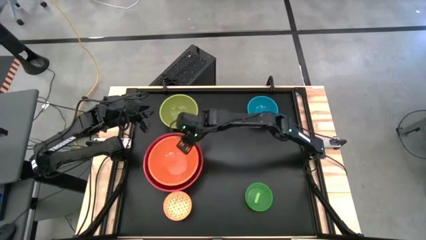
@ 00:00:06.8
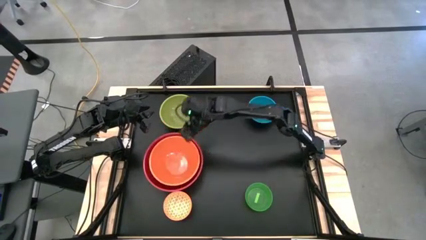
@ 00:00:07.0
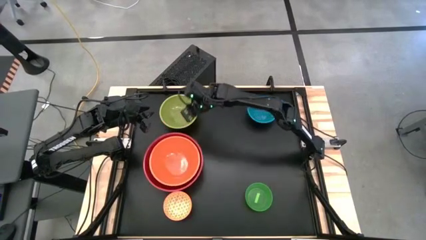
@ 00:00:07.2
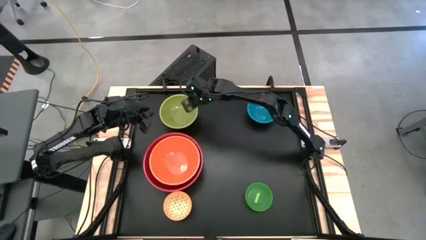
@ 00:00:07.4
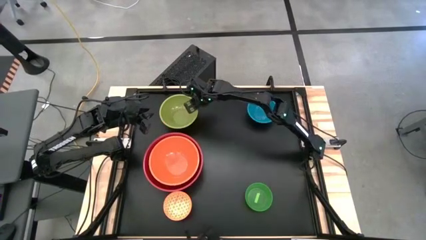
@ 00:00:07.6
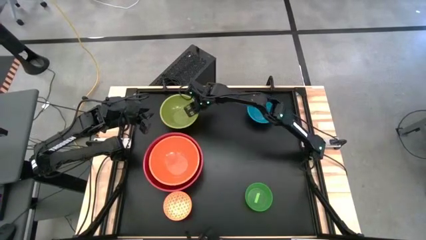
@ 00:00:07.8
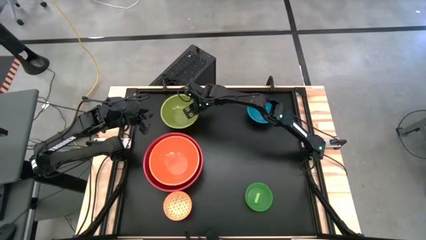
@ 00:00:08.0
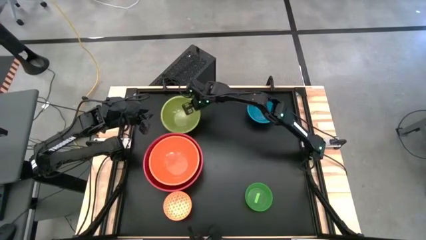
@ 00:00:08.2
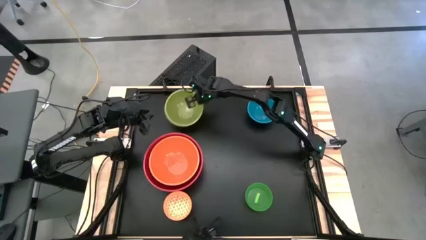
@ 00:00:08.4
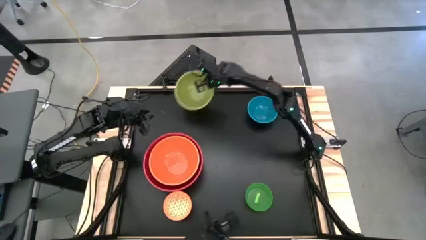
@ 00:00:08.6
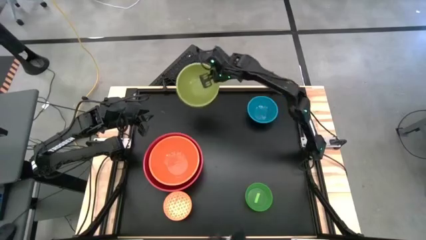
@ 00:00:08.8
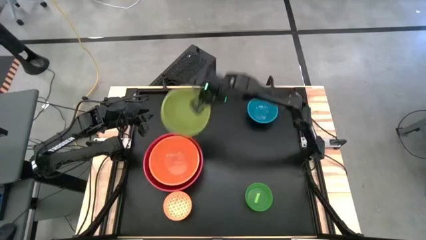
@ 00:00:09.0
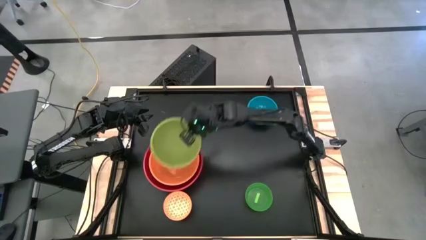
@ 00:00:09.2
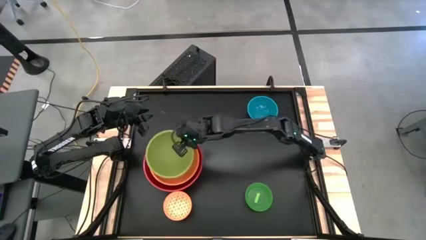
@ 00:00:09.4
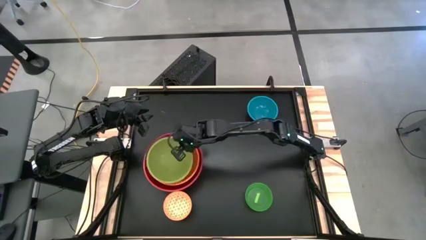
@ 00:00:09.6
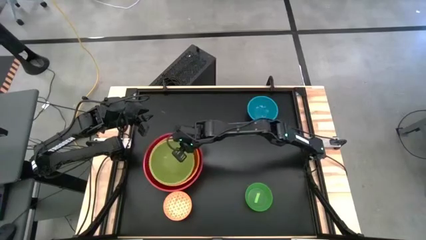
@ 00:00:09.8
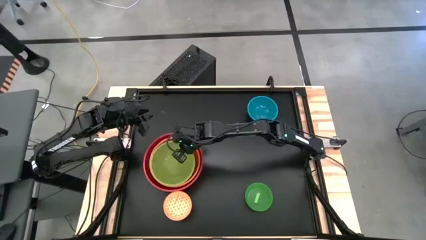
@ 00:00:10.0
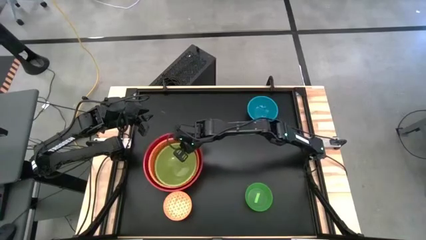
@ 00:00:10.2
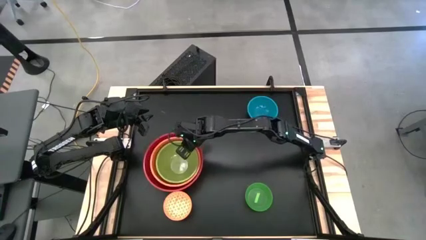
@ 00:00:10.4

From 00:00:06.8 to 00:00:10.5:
Stack the light green bowl on top of the orange bowl

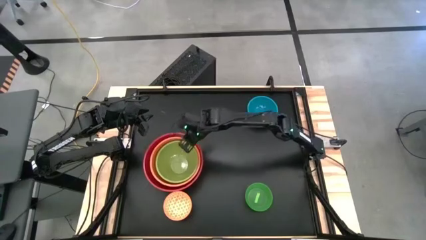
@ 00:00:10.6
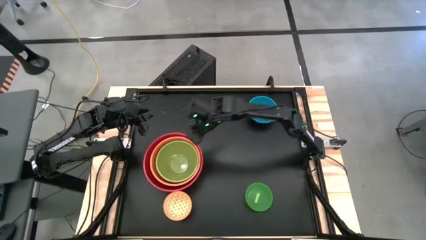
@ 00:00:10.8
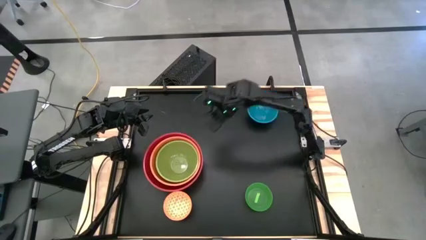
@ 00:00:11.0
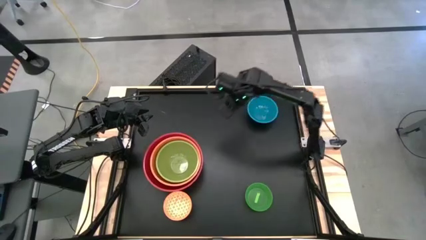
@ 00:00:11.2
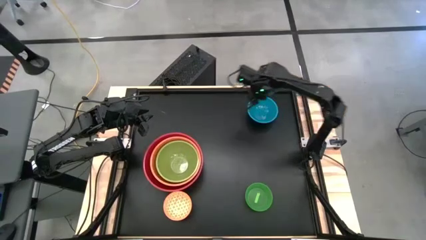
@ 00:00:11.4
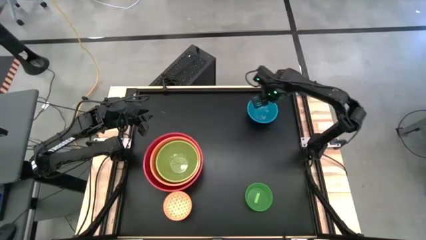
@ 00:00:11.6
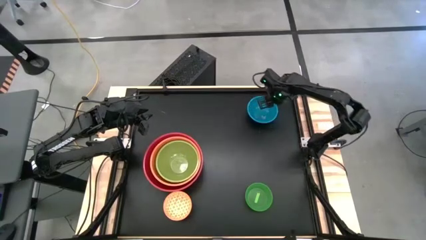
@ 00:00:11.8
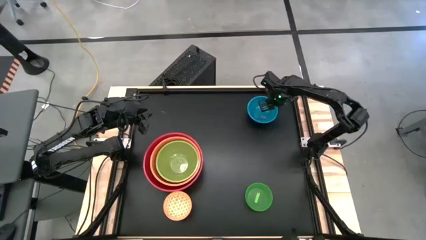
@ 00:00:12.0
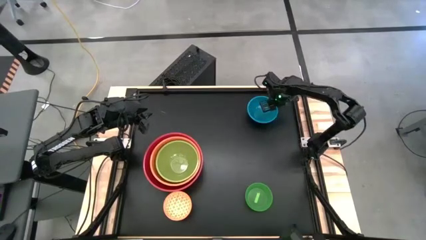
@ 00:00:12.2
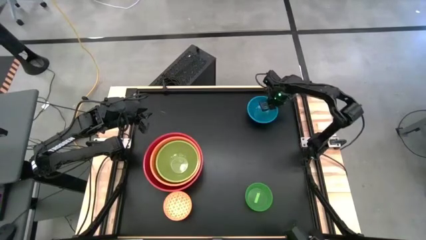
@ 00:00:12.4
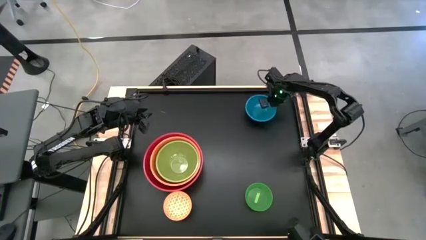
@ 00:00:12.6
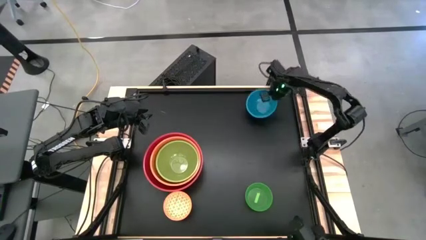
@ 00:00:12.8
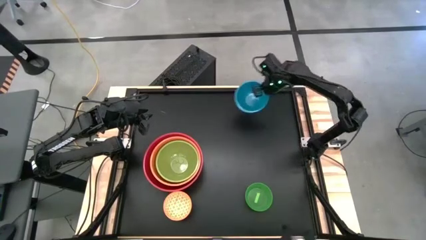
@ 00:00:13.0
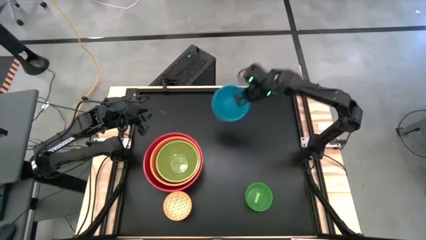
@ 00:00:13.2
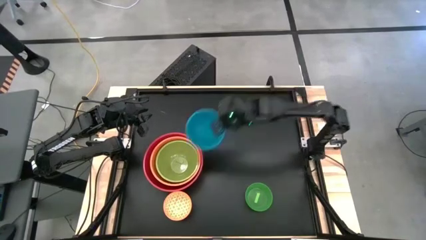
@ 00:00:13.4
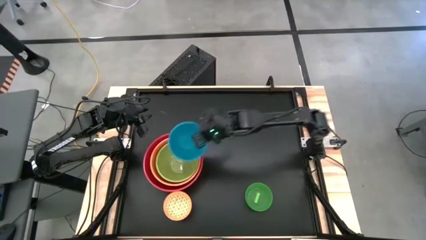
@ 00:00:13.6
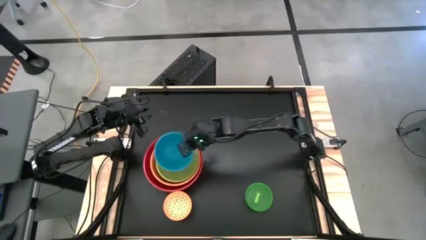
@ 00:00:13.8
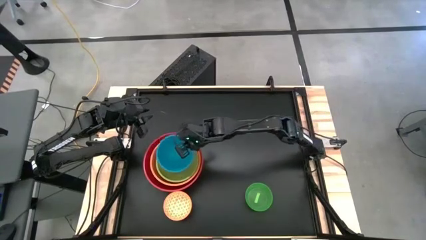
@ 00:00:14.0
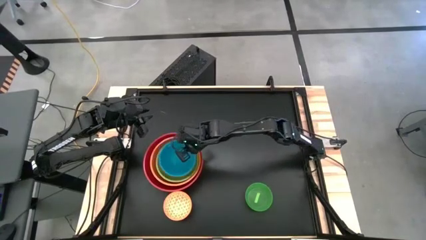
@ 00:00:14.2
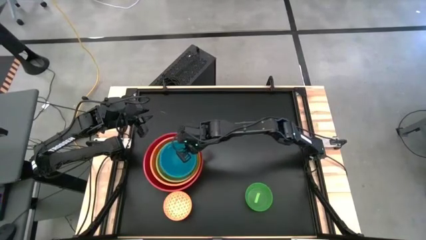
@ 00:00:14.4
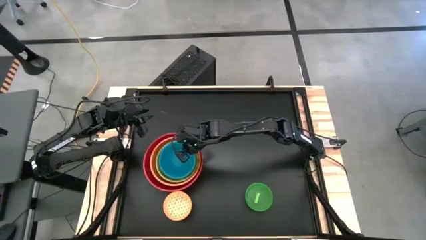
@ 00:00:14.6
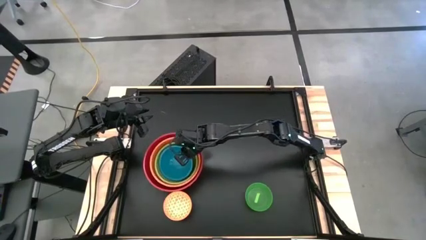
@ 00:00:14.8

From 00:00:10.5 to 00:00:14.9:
Stack the blue bowl on top of the light green bowl

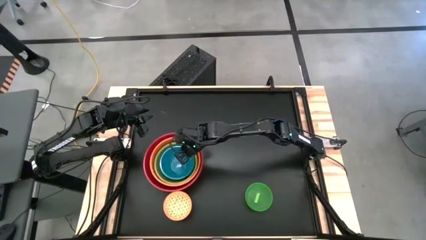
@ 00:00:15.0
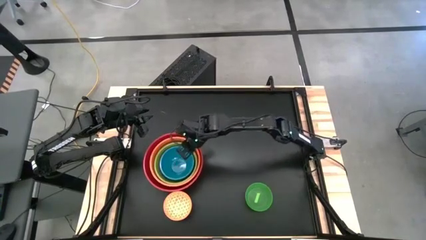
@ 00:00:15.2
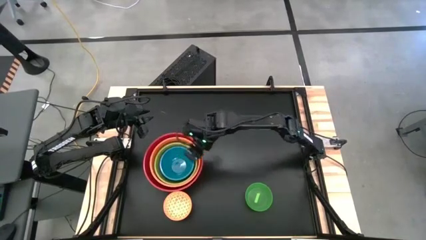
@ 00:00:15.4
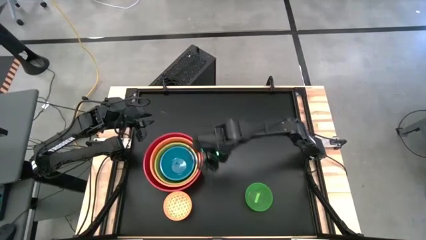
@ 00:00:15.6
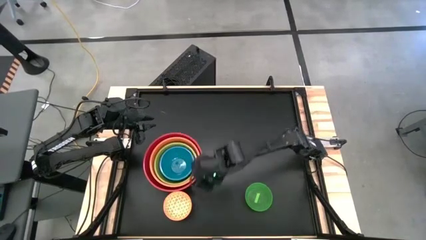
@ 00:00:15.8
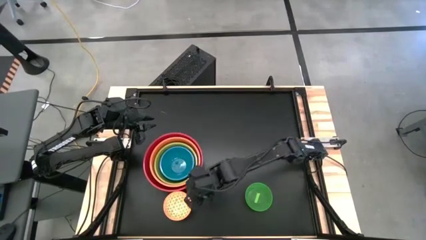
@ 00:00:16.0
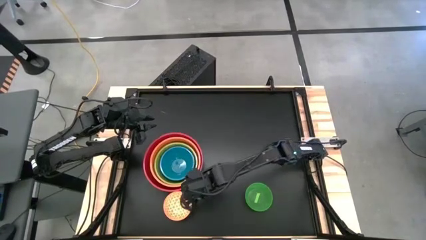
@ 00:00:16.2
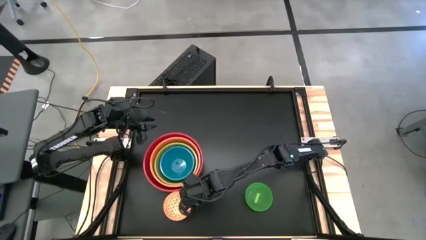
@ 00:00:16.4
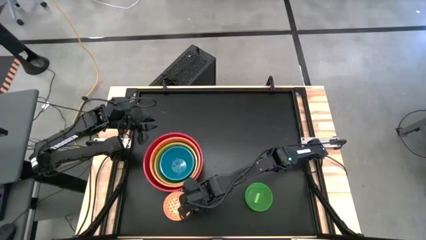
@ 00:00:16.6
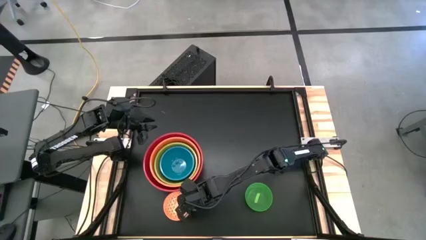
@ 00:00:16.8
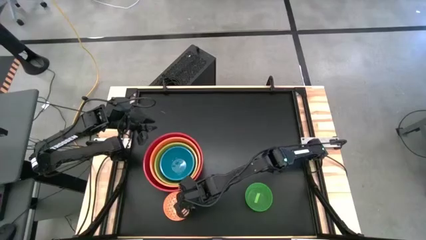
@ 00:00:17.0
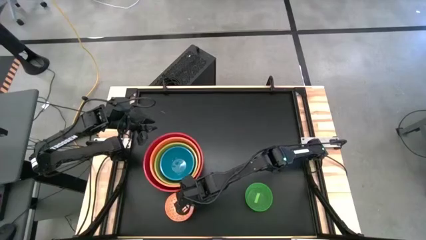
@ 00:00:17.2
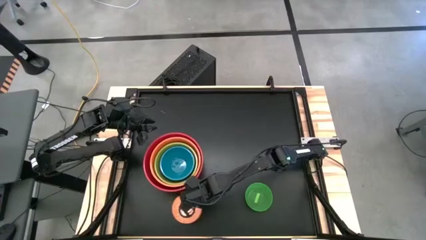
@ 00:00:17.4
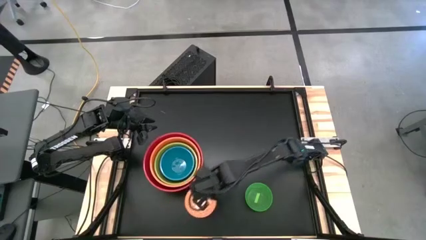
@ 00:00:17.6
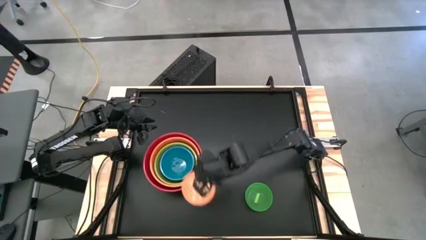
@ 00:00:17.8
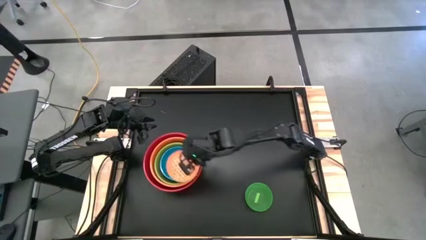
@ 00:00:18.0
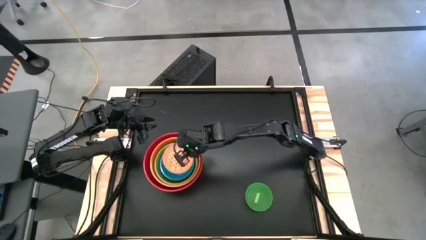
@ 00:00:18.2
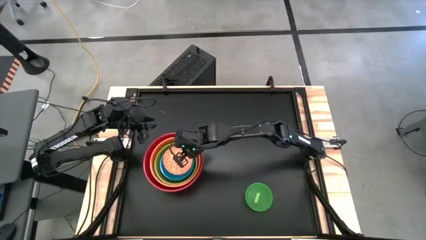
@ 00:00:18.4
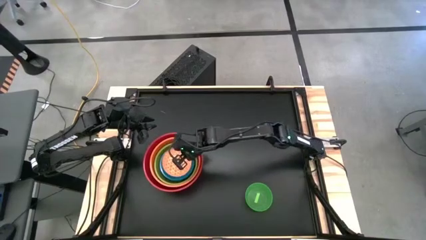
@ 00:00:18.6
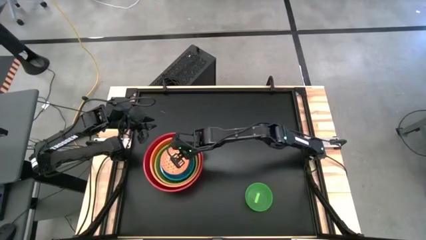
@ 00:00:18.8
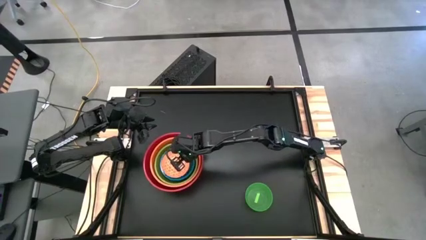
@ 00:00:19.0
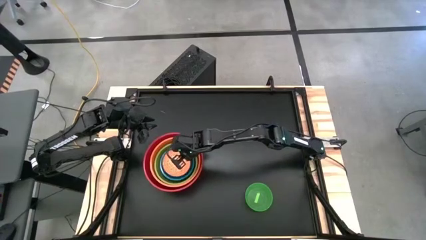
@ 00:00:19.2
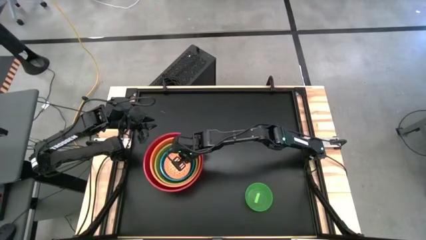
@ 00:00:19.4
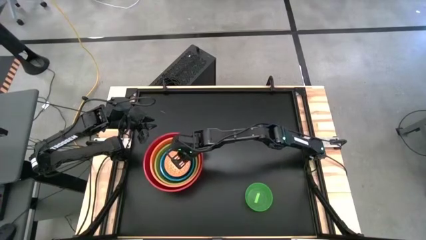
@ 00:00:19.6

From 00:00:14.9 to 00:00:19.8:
Stack the orange patterned bowl on top of the blue bowl

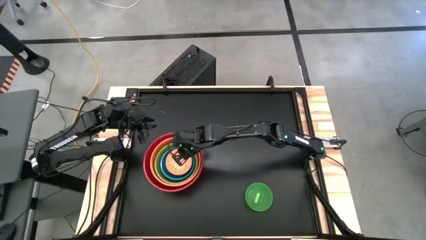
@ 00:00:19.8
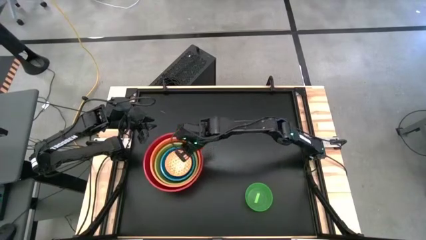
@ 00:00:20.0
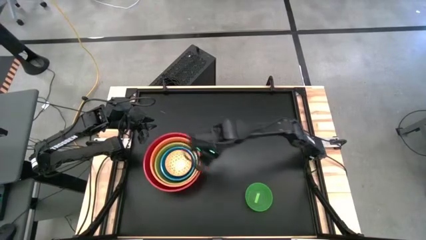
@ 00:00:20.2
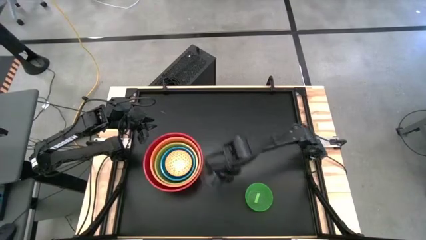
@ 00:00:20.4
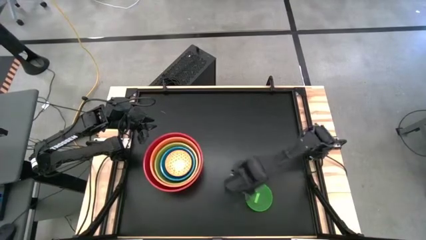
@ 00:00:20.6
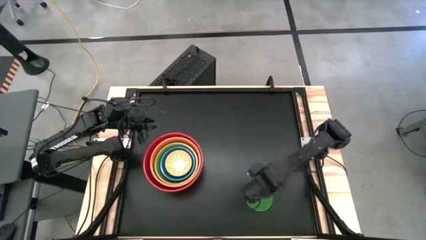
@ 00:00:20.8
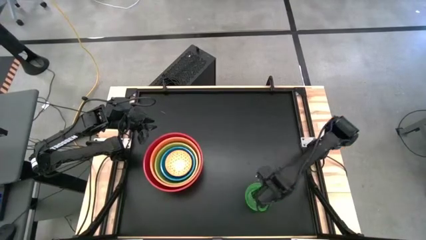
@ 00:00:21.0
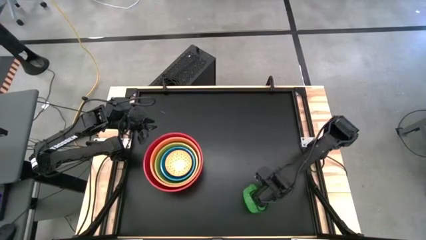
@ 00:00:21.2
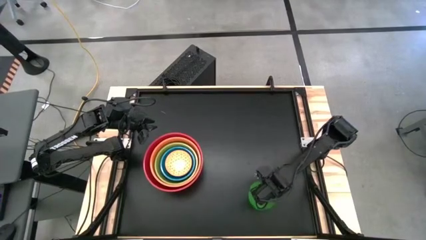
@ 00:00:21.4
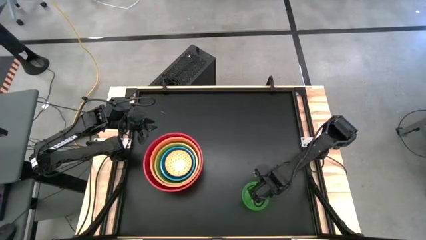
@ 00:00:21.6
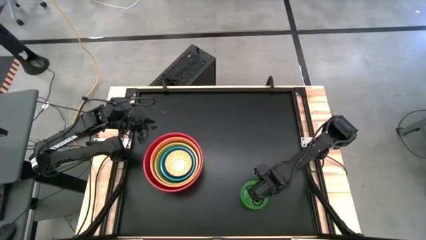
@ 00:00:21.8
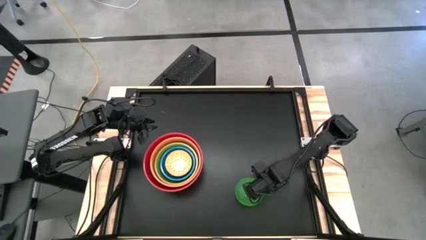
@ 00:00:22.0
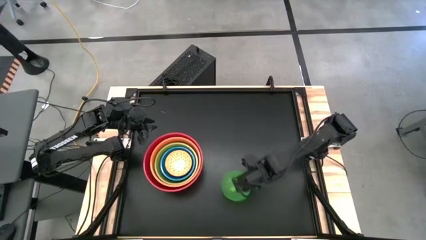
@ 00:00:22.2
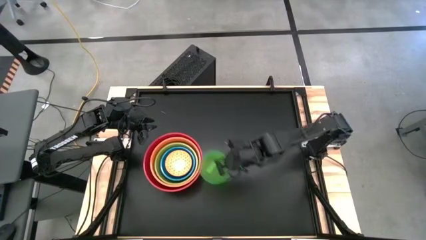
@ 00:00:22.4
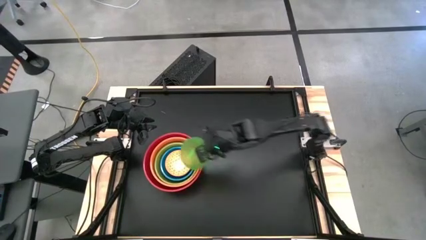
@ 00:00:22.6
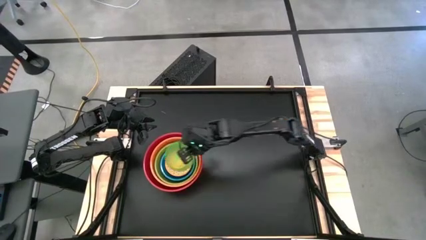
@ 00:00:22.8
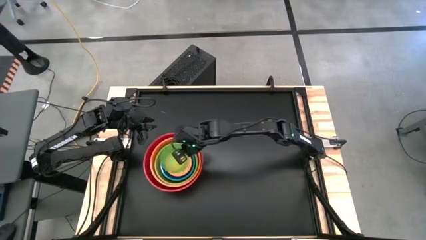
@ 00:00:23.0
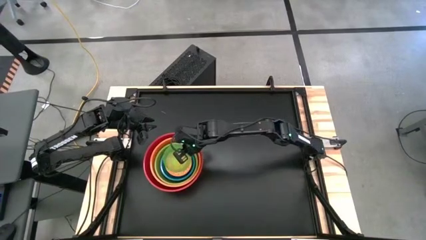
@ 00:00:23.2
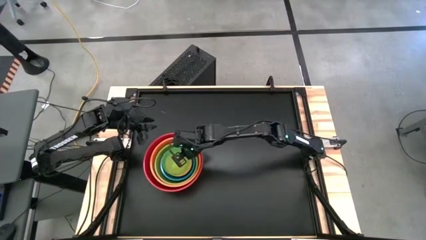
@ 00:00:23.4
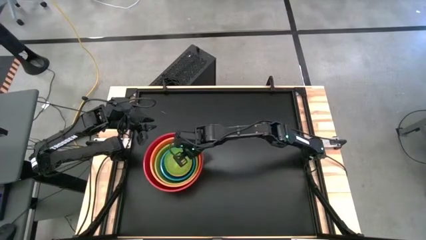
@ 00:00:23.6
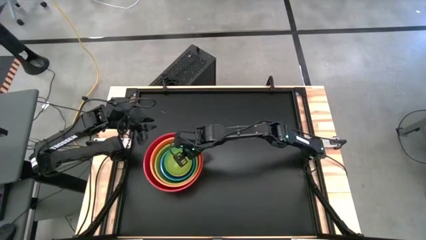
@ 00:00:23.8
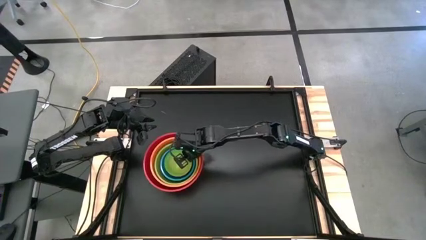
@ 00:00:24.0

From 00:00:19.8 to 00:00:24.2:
Stack the green bowl on top of the orange patterned bowl
